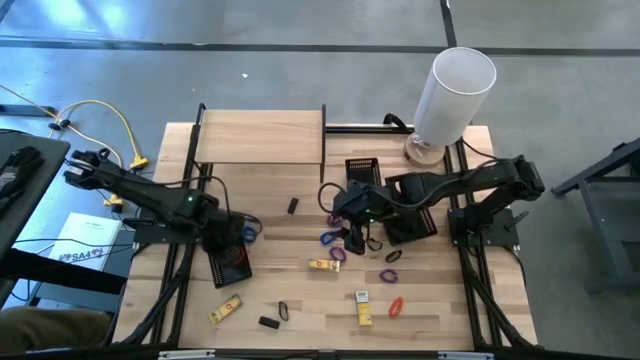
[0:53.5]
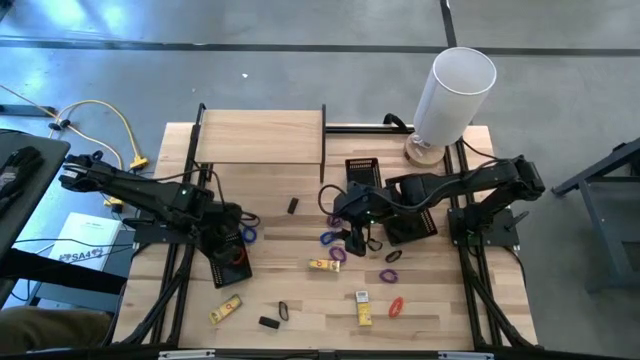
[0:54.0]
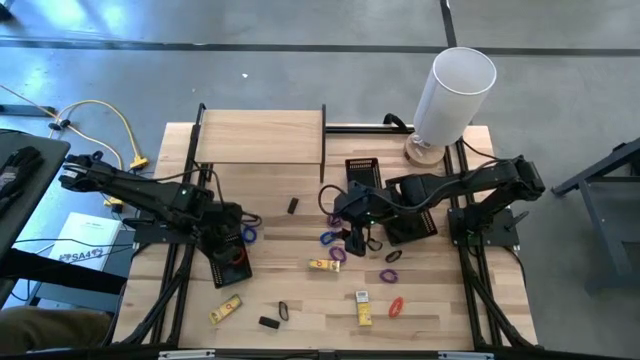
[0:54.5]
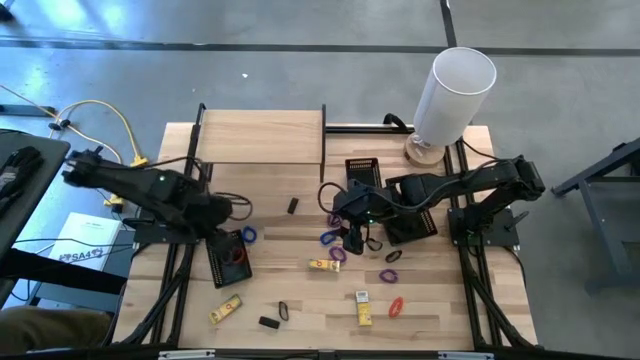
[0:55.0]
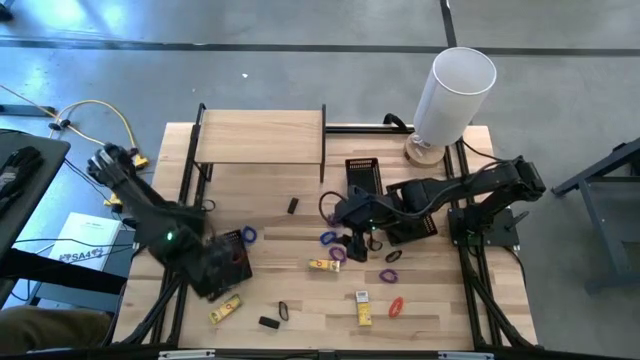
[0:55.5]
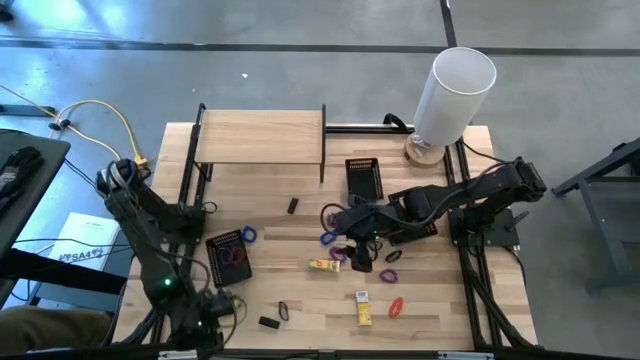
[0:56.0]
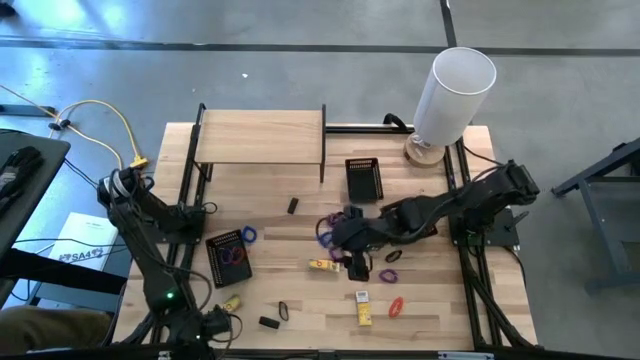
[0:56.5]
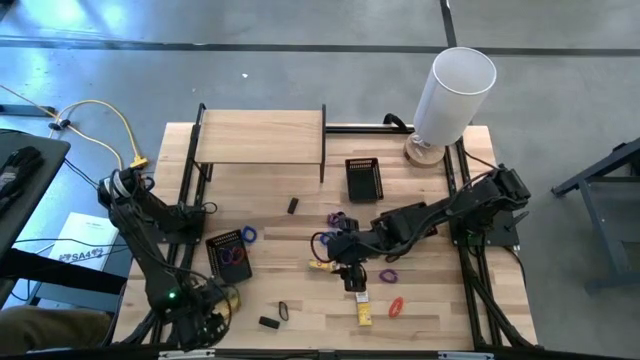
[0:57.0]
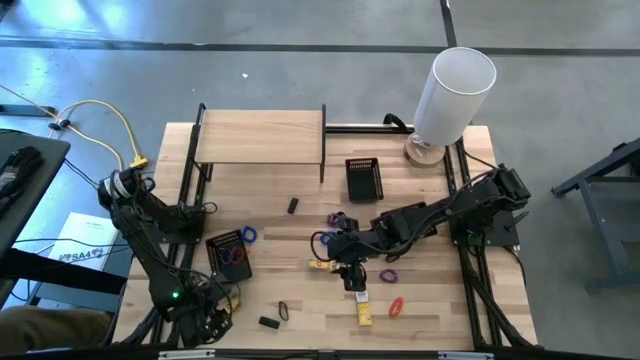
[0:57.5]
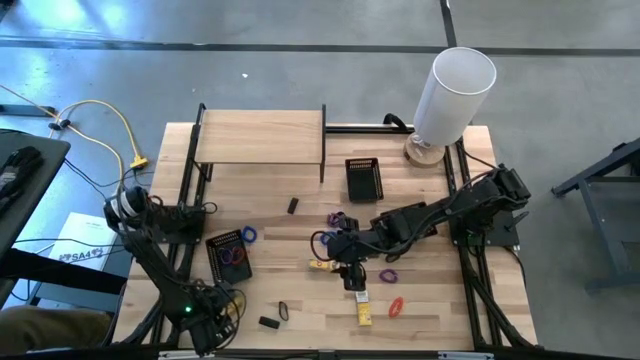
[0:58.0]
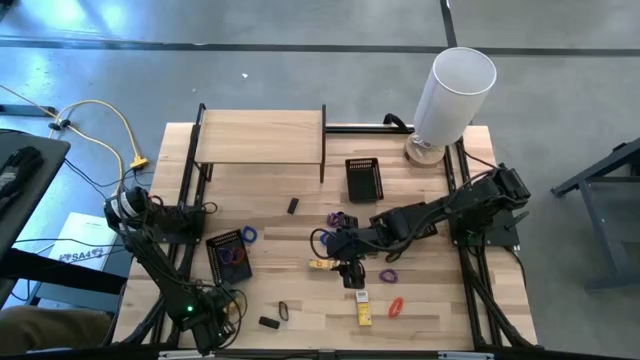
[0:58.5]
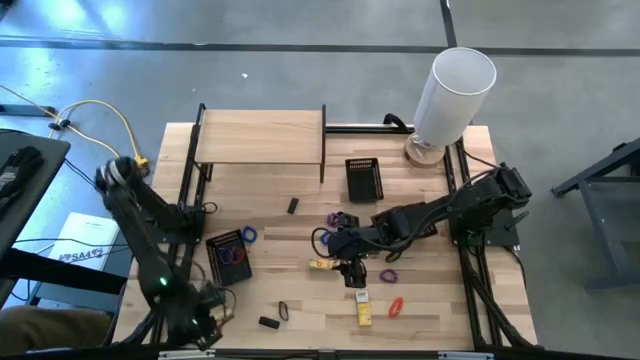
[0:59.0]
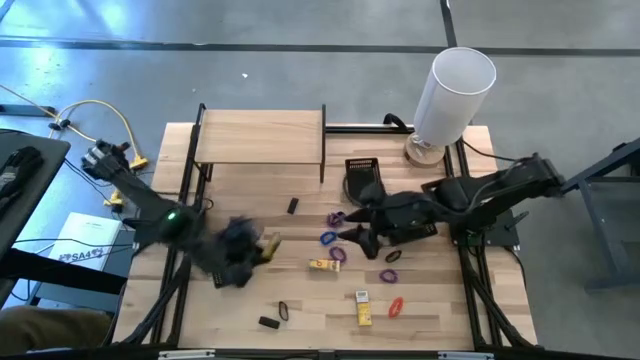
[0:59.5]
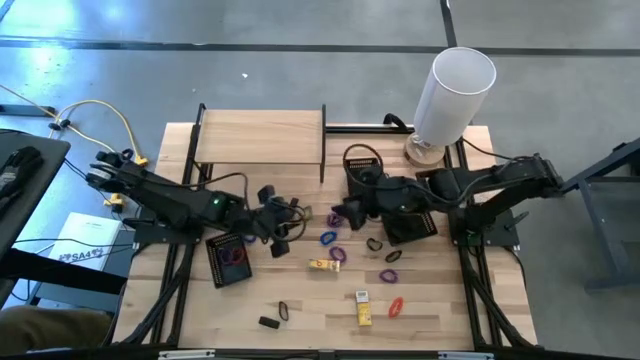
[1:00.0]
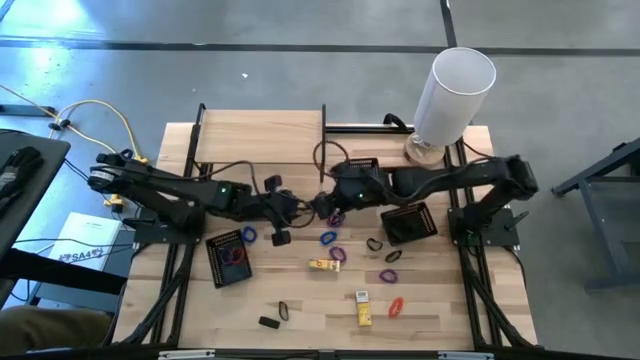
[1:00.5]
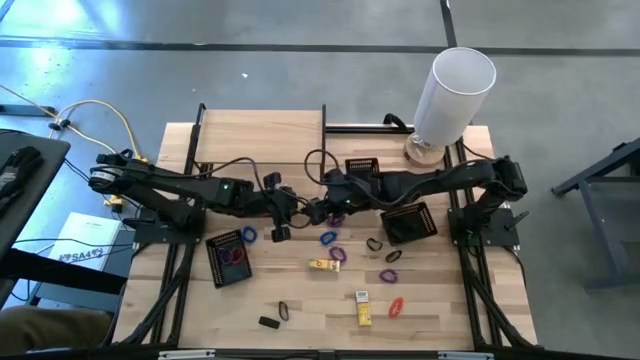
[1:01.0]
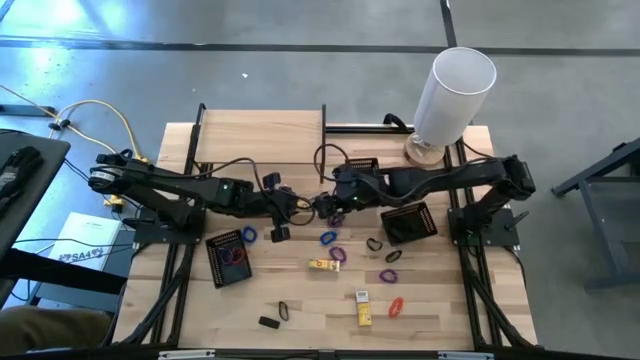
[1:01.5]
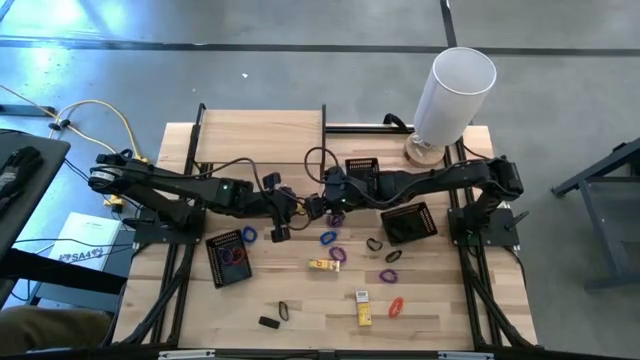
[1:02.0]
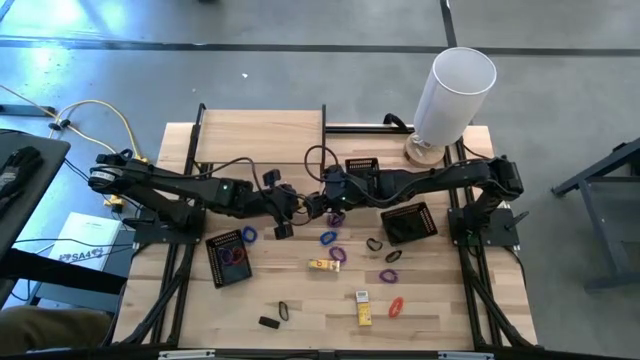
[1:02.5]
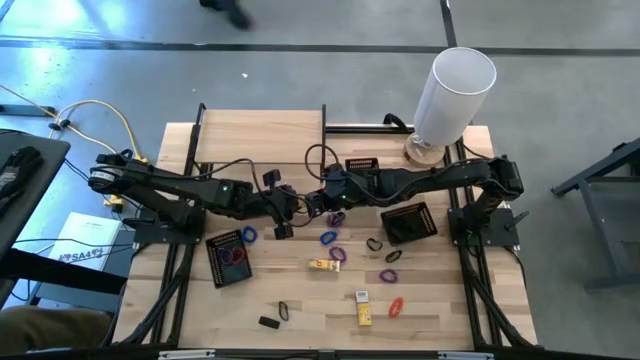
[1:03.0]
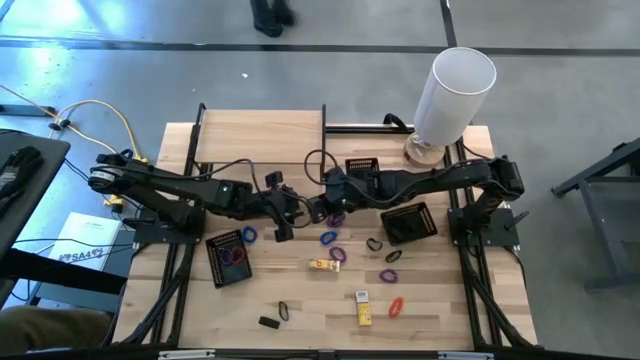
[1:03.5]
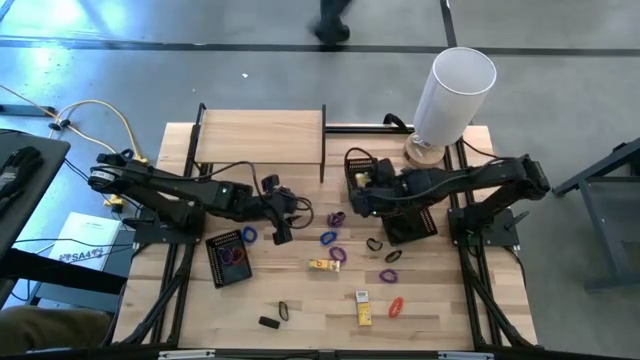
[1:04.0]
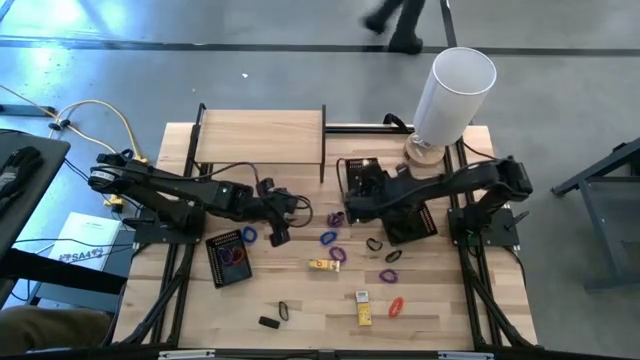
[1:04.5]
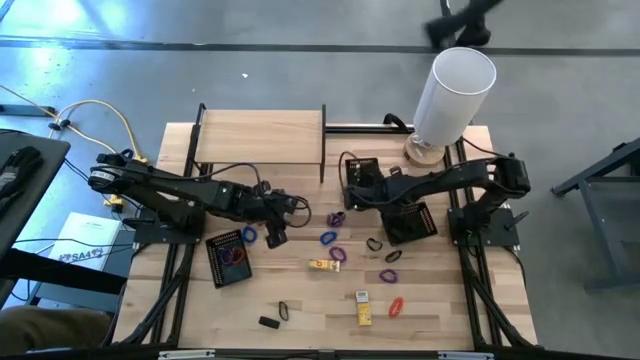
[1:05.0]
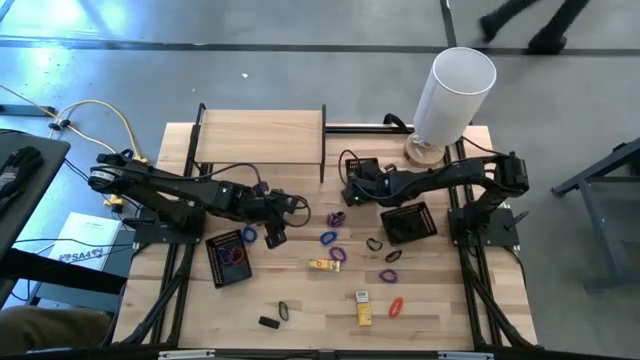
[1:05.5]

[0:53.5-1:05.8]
Task: Pick & Place Office Desk Supplies
Put the crayon box into the top black bin

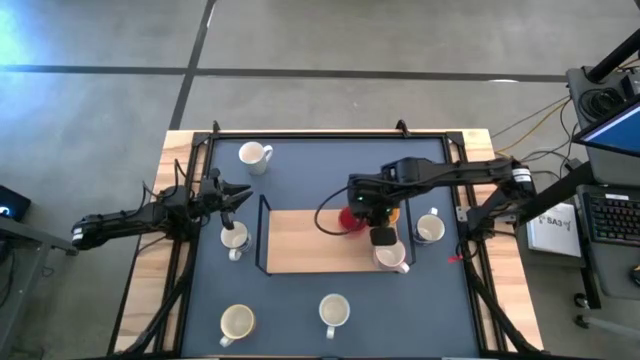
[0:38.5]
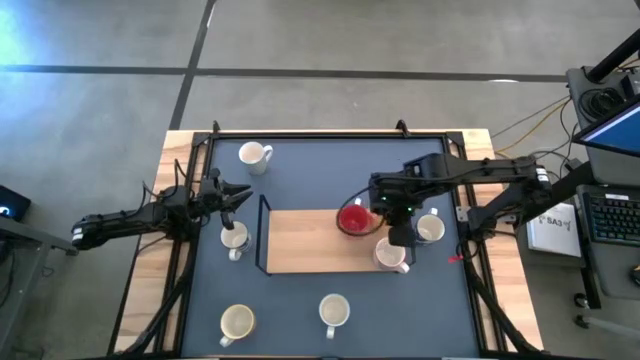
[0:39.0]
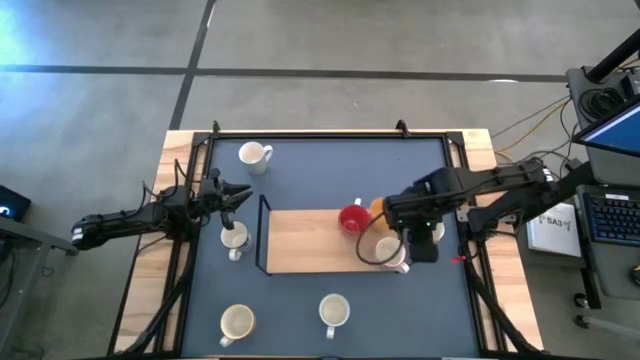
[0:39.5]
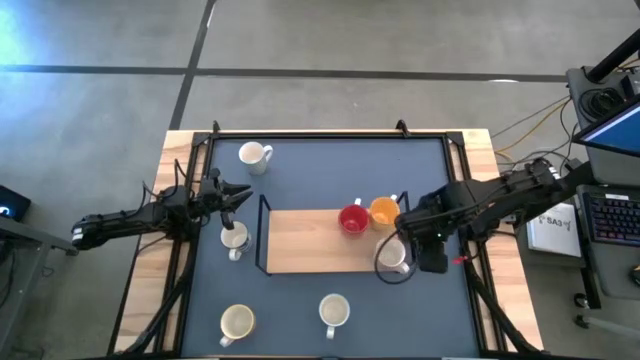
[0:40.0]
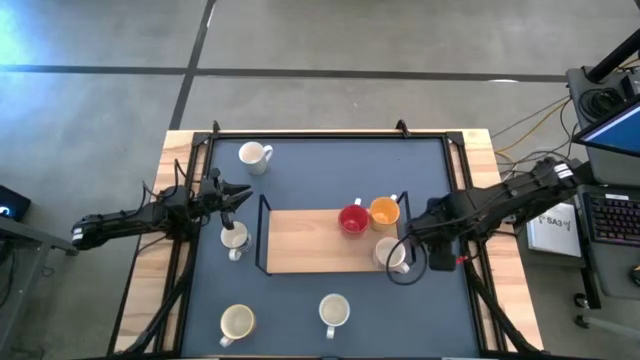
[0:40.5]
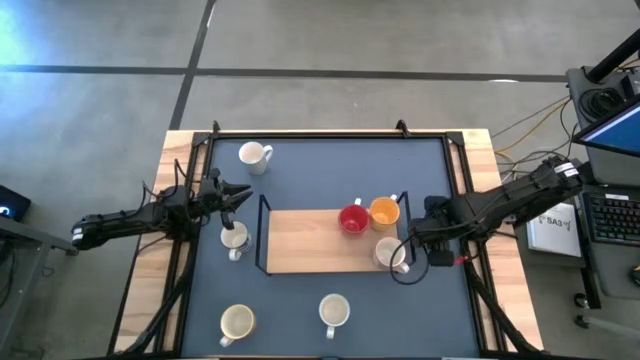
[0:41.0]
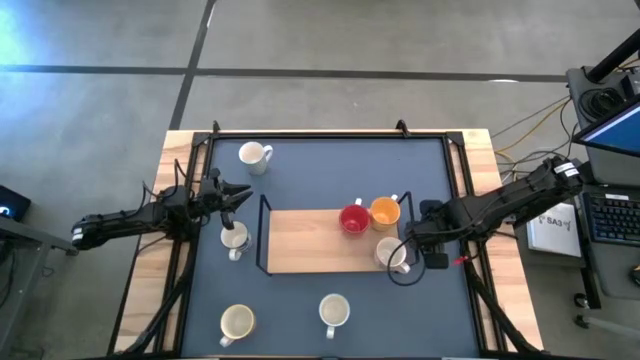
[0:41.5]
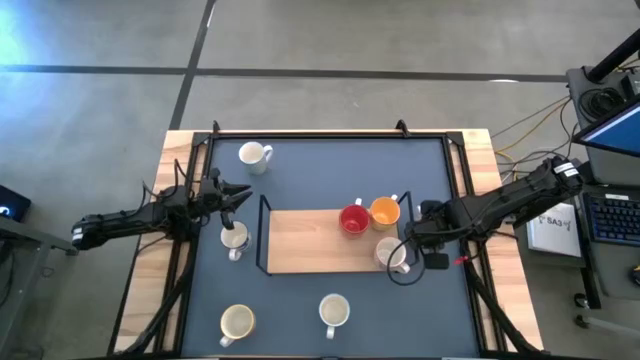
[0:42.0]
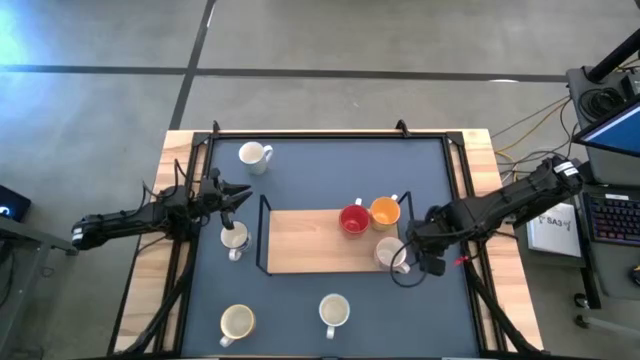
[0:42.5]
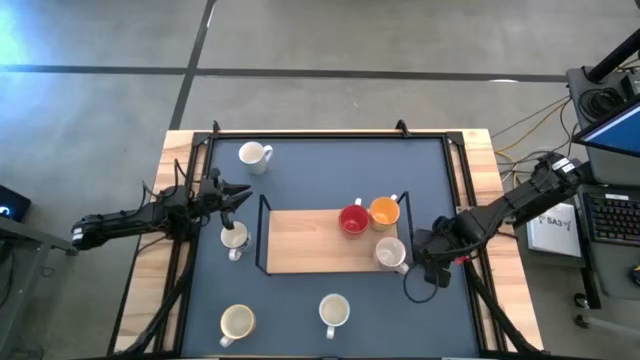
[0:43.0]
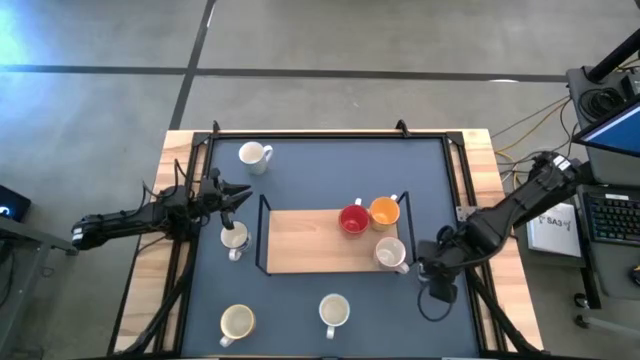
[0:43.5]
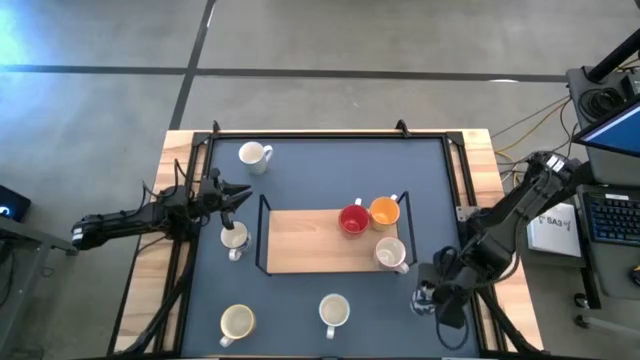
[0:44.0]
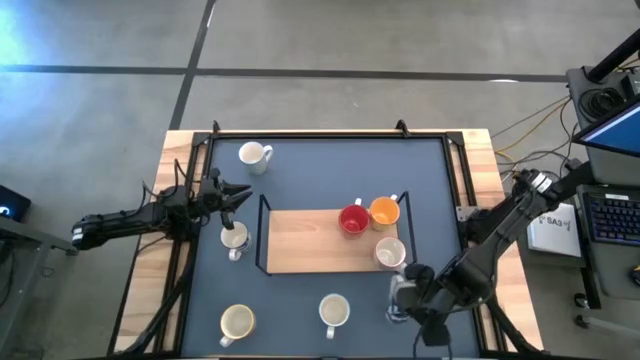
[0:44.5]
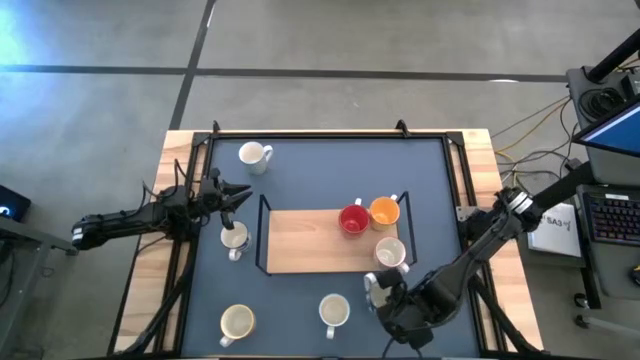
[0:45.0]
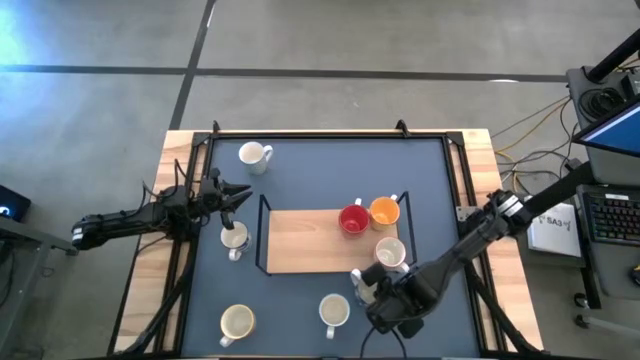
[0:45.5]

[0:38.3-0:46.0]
Task: Place coffee mugs
Move the right blue cup to bottom center of the table
